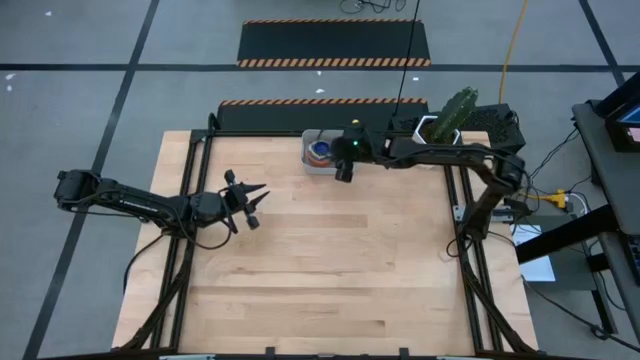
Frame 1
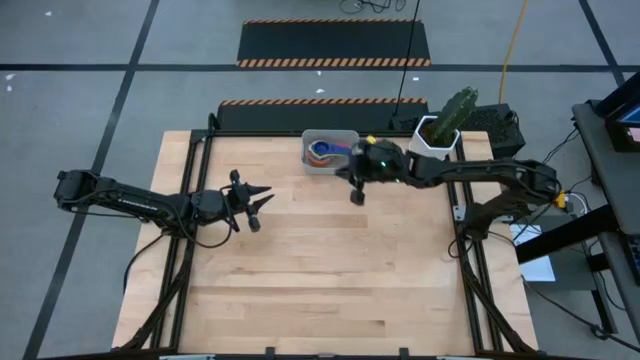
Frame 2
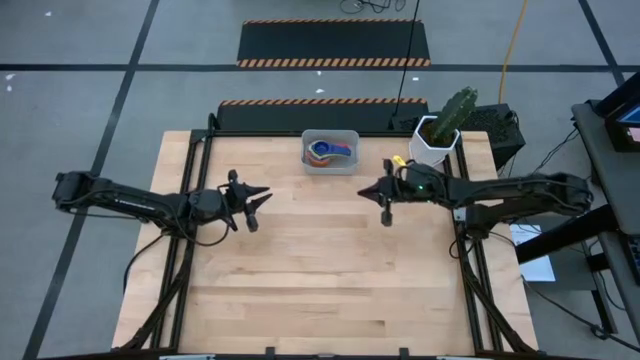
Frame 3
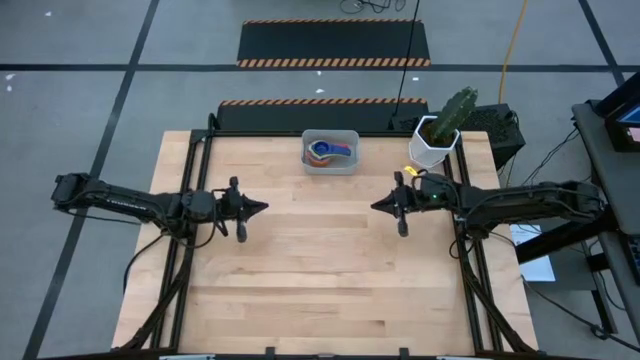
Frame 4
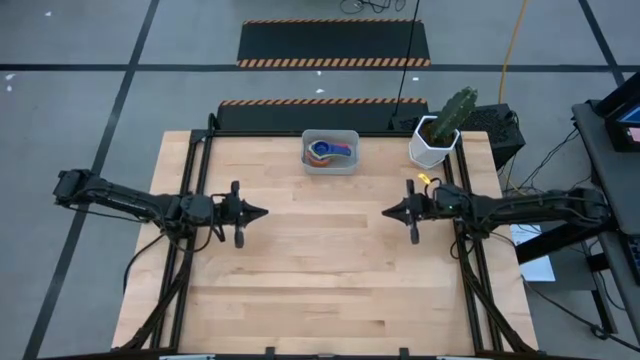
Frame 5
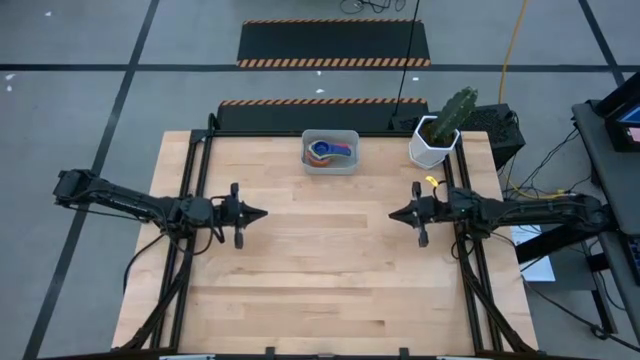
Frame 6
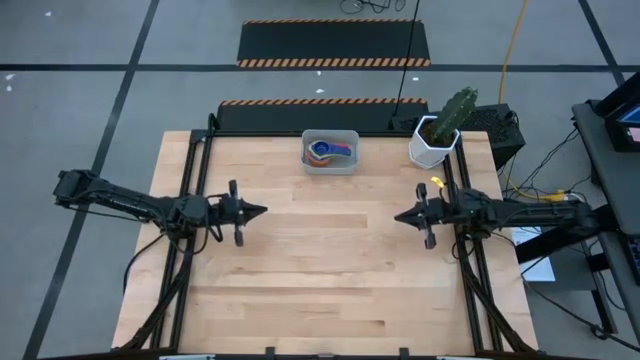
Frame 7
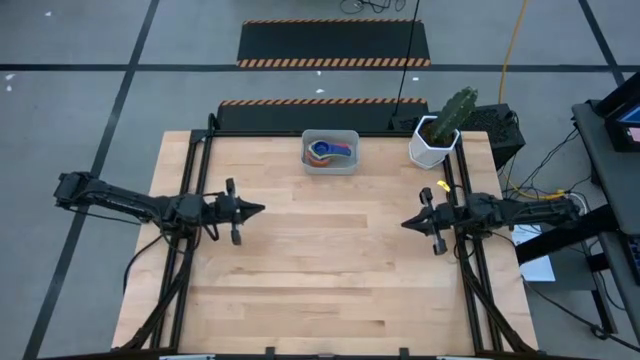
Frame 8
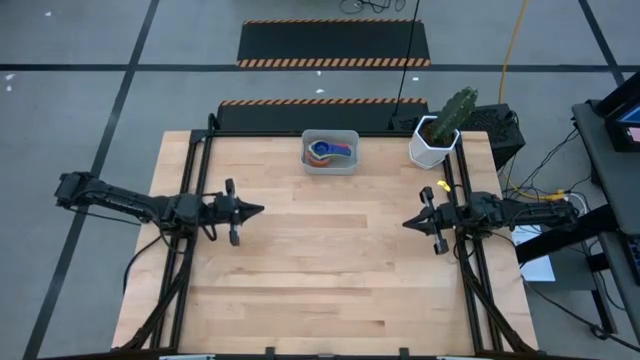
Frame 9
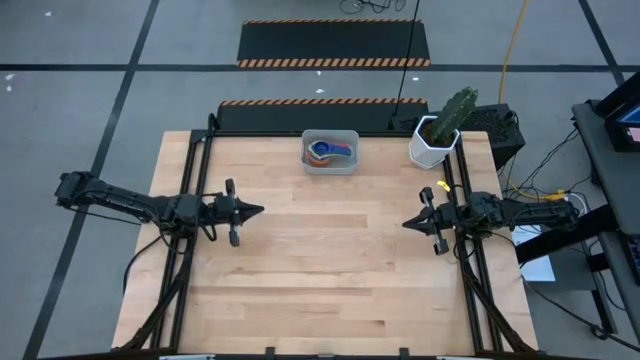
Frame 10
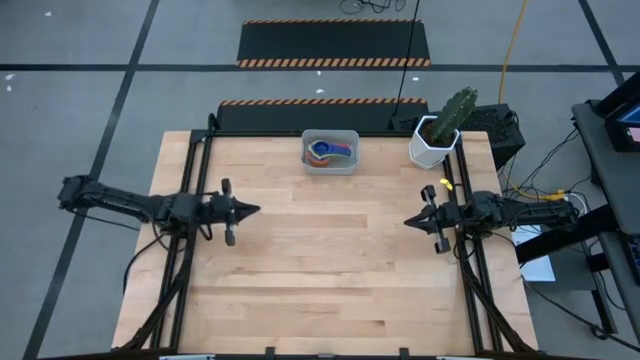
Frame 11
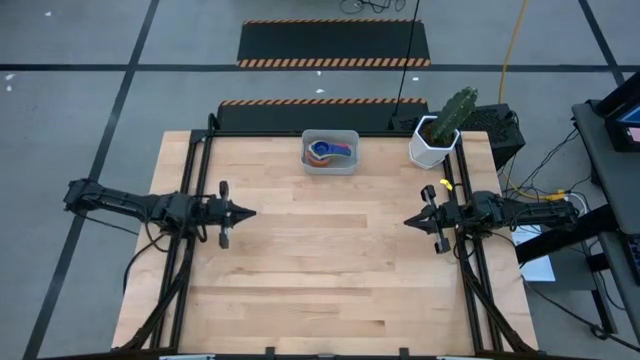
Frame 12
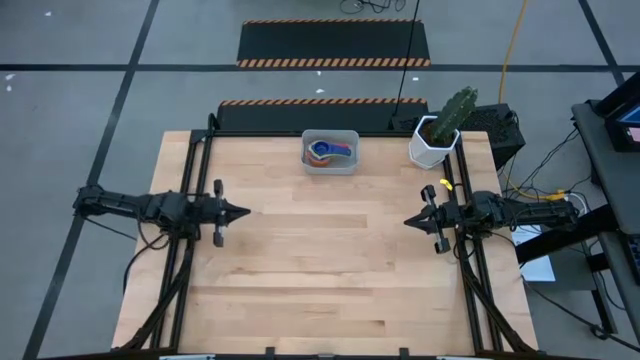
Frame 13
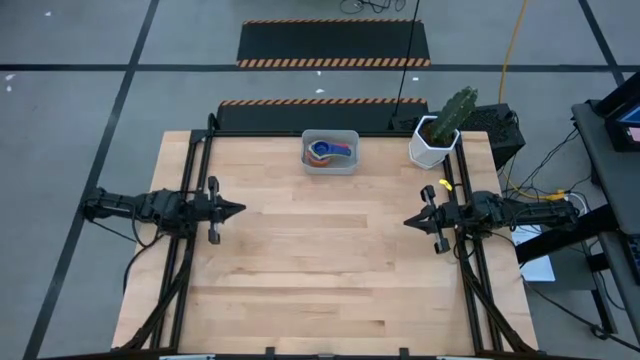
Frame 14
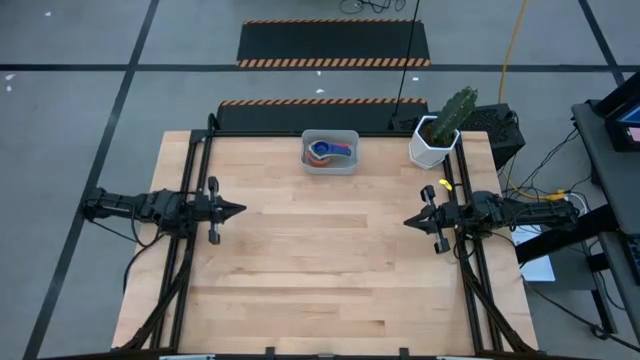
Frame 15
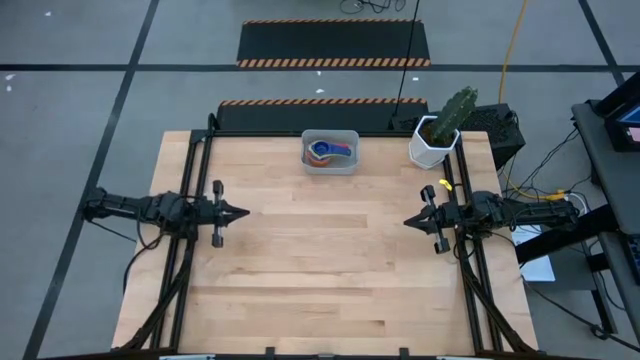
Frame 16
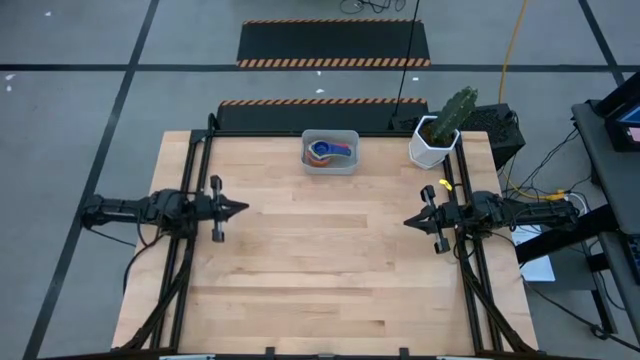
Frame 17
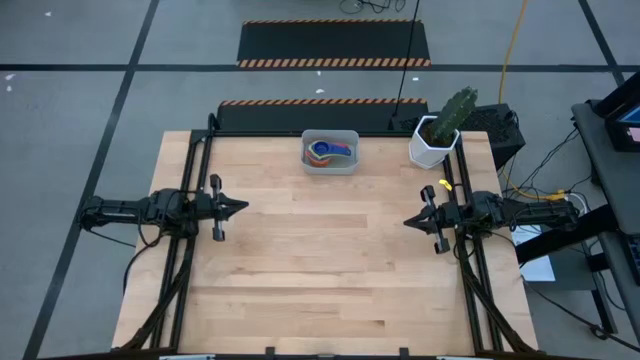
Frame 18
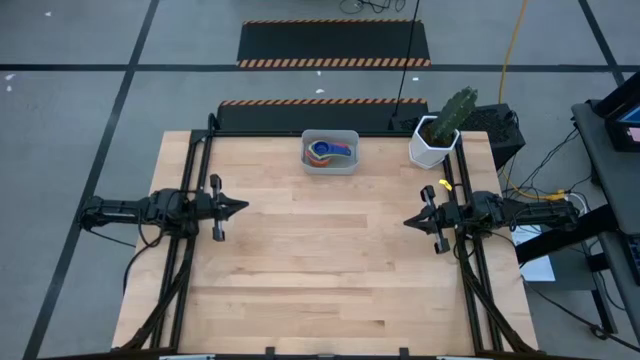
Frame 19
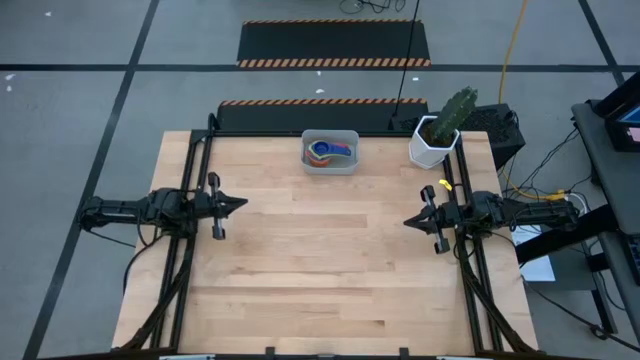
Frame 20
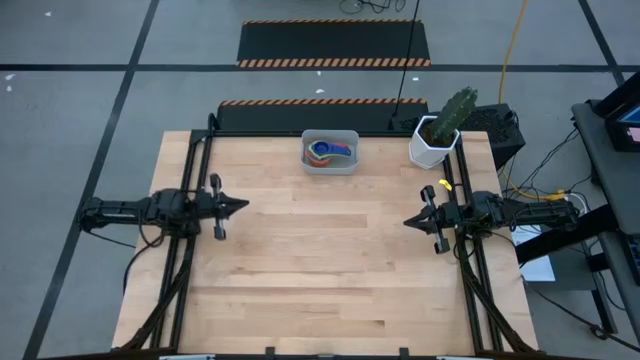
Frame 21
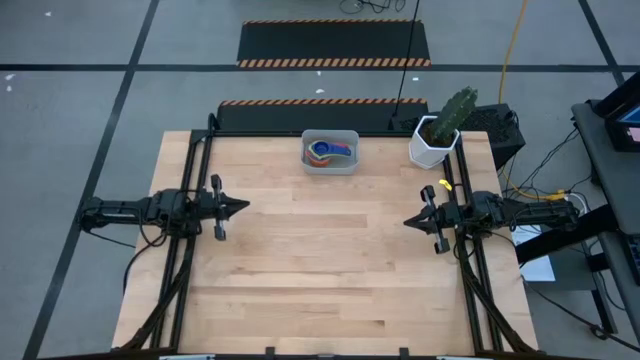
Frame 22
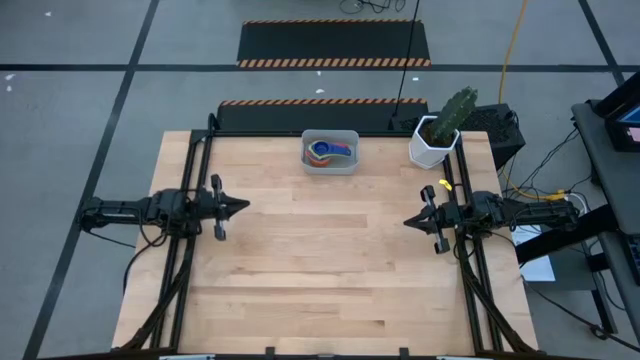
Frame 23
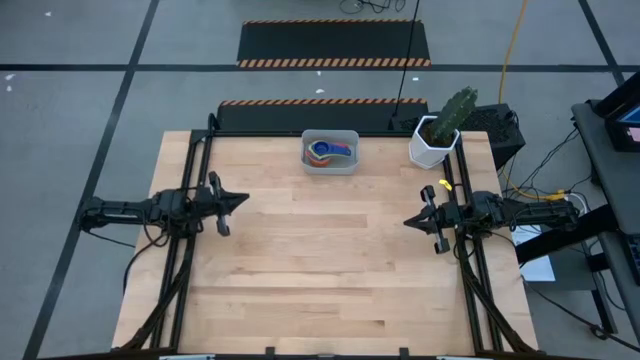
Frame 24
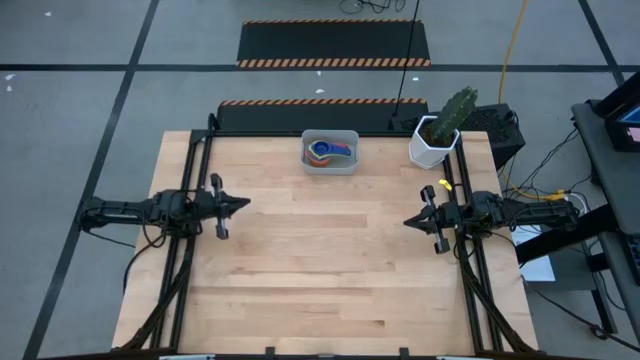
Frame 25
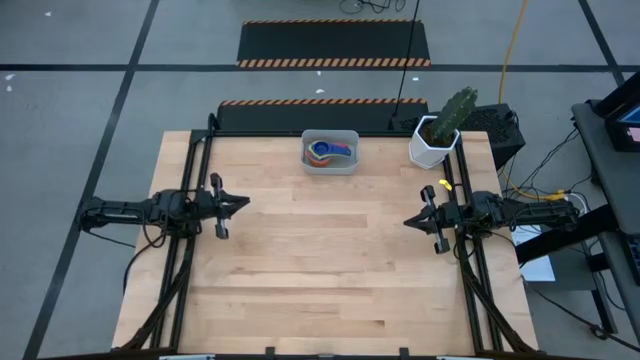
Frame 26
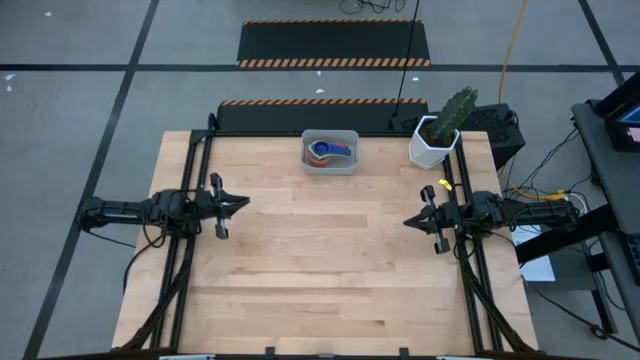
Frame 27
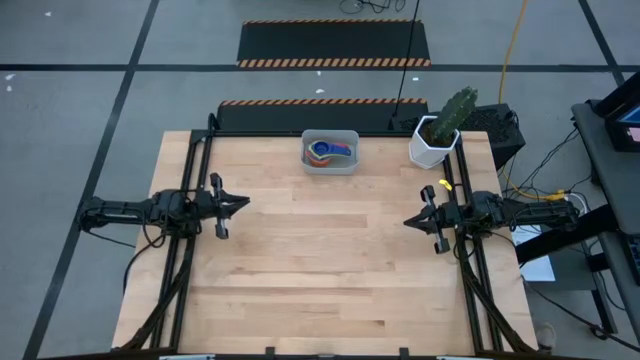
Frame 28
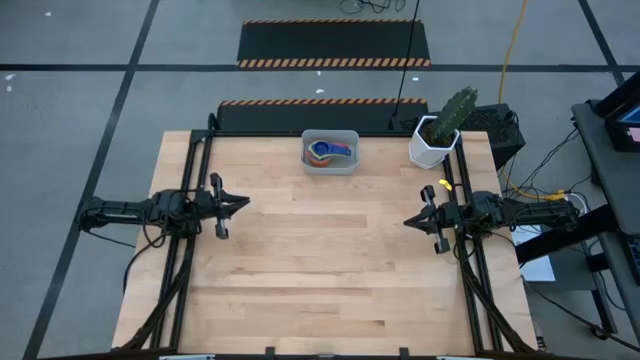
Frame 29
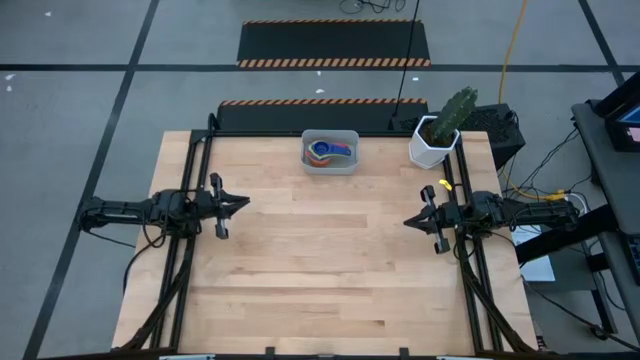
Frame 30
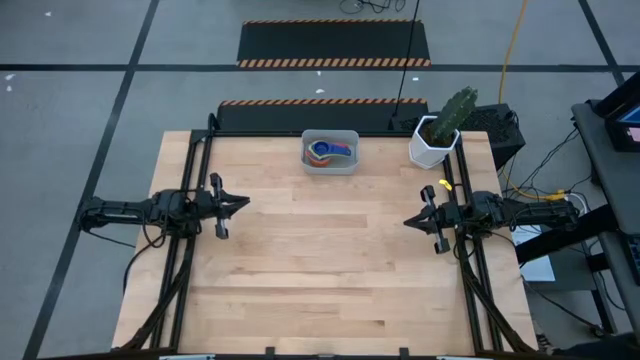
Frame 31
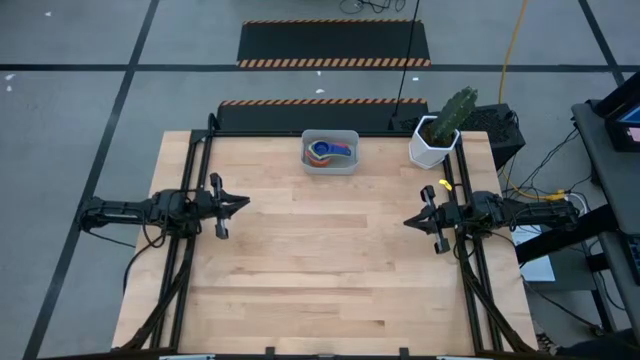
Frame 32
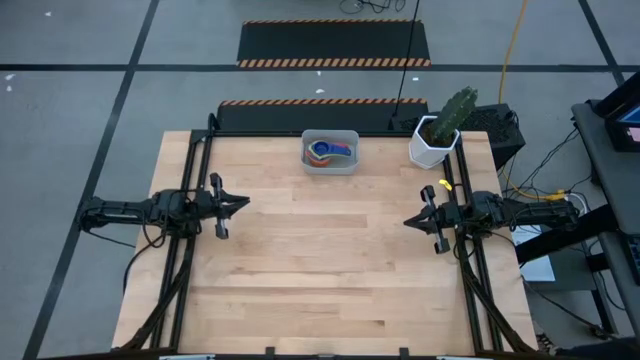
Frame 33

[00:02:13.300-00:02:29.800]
Task: Nest measuring cups in basket
Return to Home Position

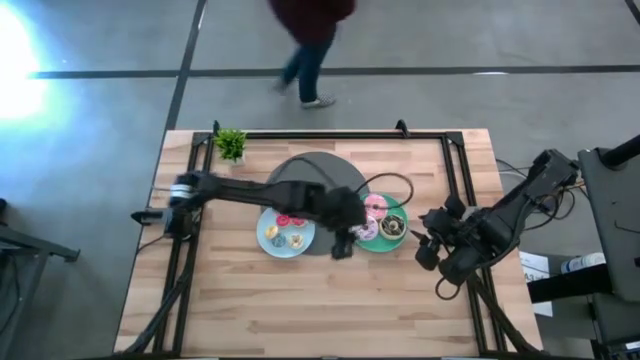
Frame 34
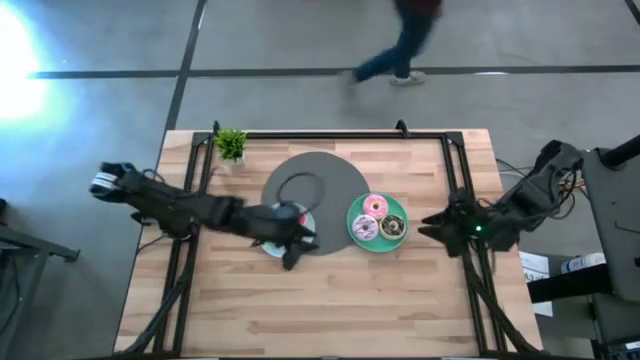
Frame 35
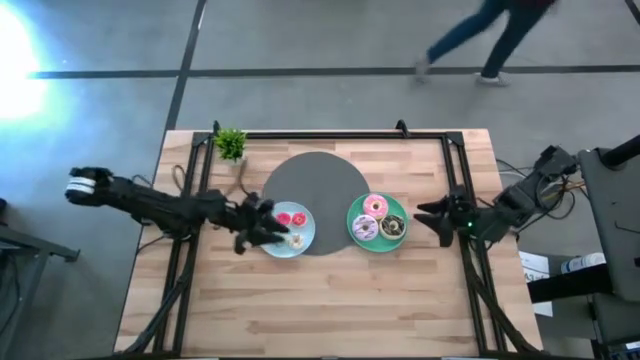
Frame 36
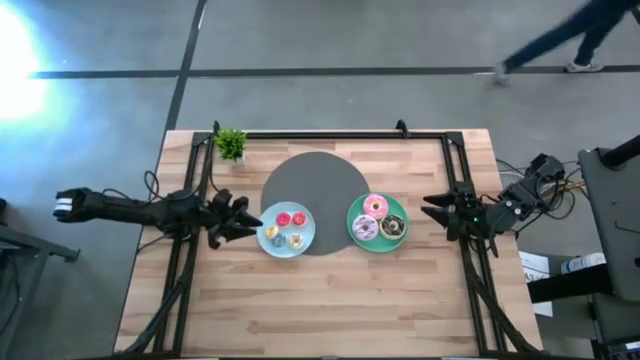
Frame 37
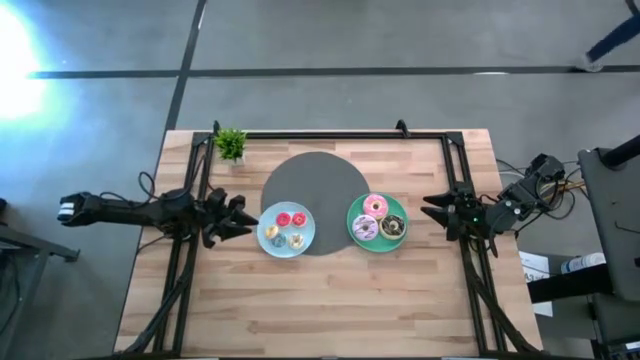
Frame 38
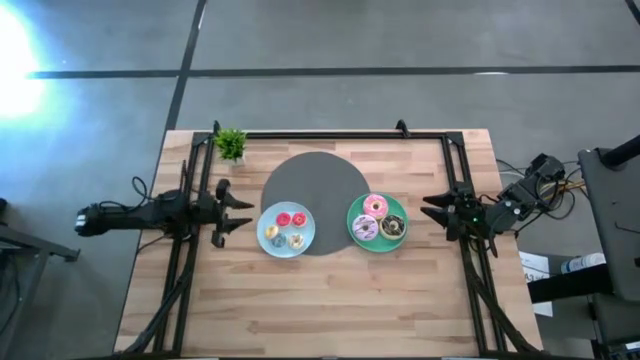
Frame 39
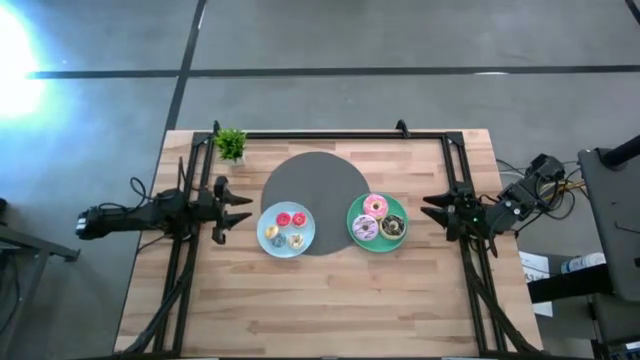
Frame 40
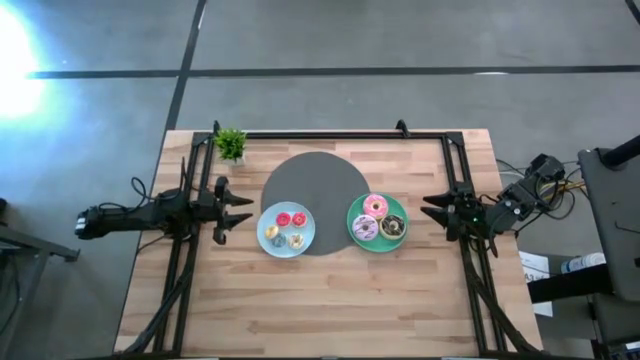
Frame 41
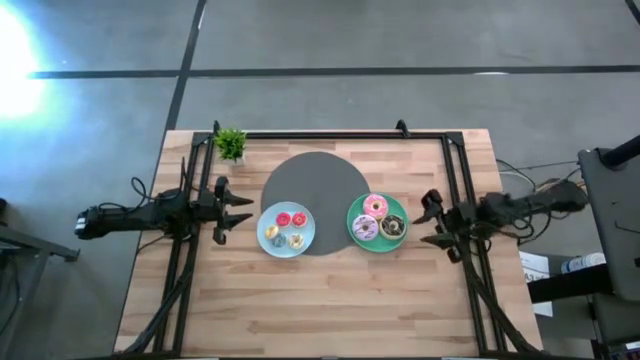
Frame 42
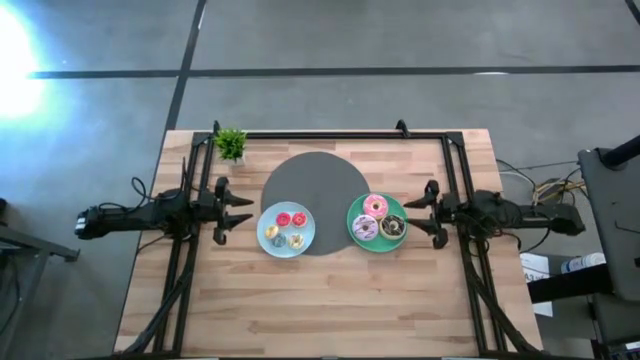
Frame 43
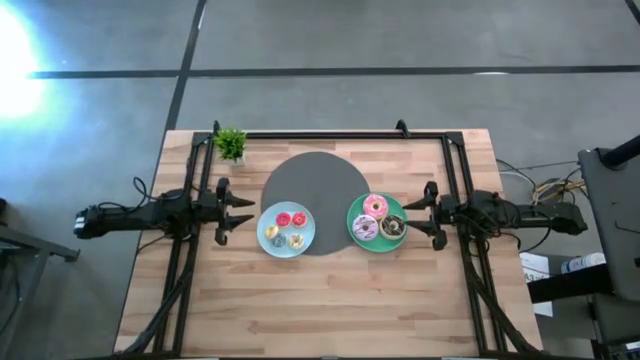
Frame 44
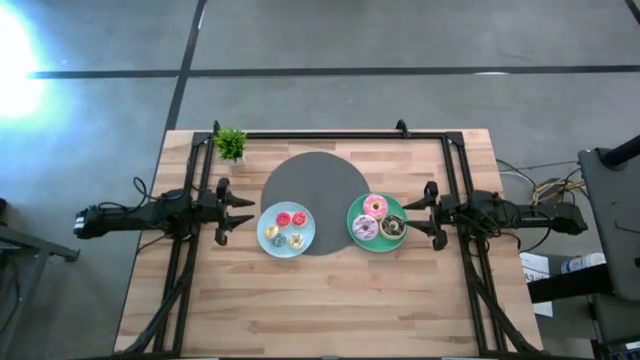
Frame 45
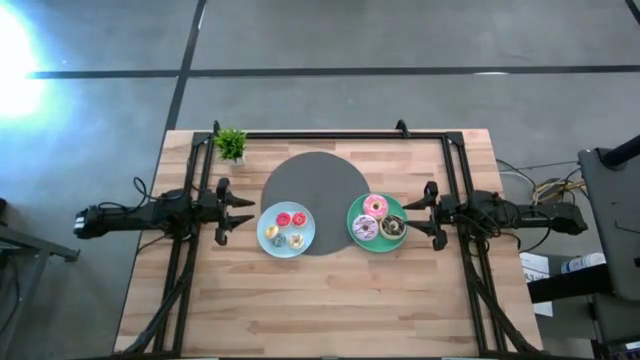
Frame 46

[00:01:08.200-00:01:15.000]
Task: Pick & Place donuts
Return to Home Position
